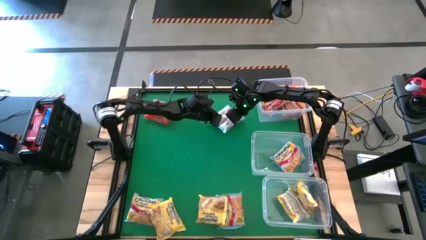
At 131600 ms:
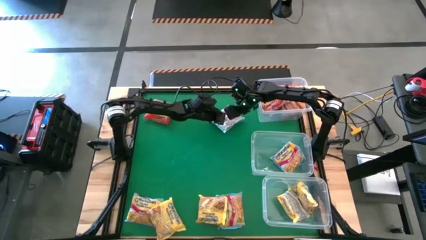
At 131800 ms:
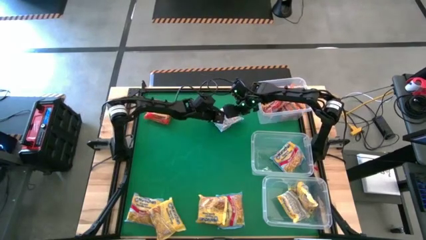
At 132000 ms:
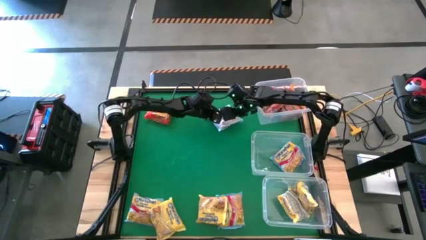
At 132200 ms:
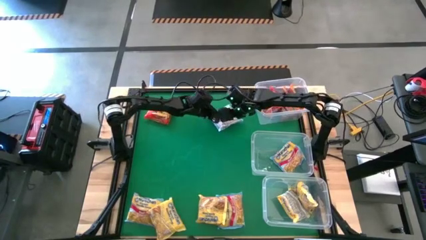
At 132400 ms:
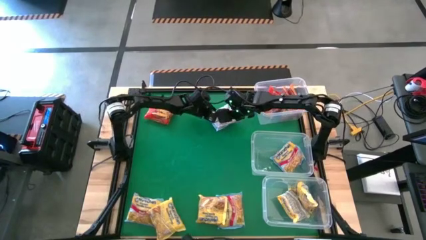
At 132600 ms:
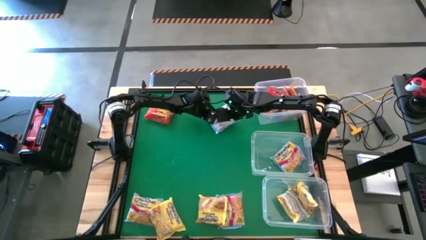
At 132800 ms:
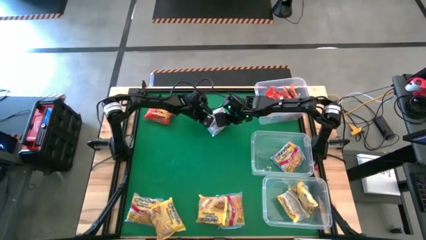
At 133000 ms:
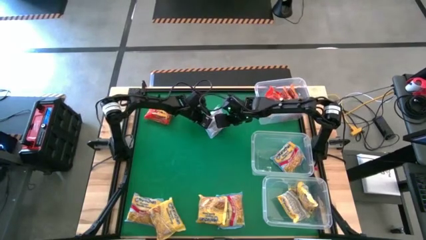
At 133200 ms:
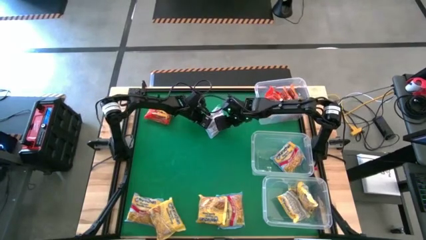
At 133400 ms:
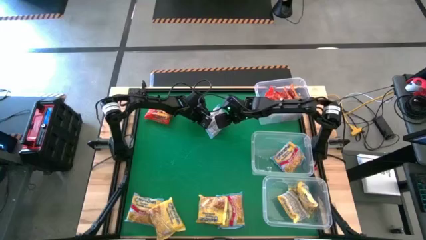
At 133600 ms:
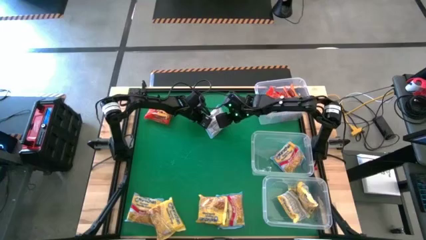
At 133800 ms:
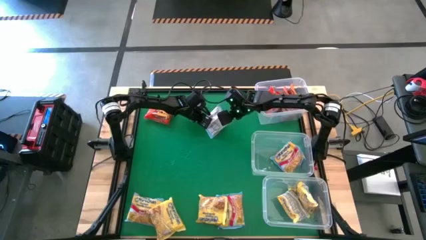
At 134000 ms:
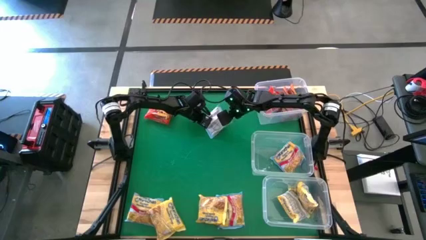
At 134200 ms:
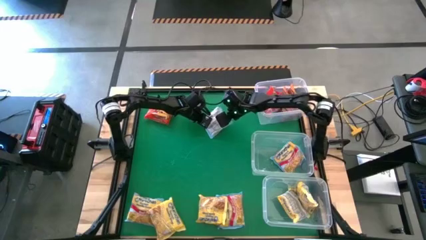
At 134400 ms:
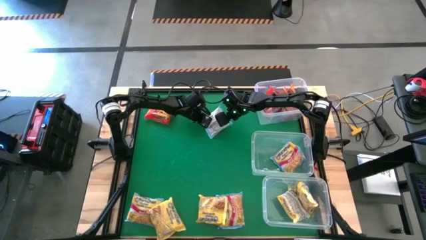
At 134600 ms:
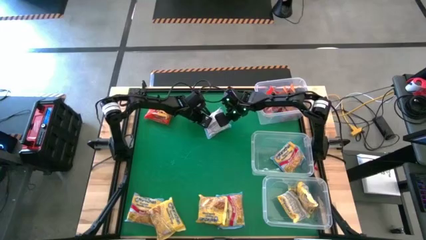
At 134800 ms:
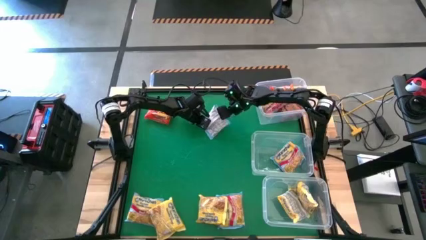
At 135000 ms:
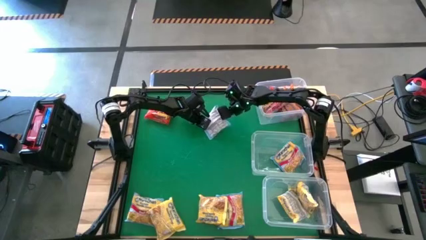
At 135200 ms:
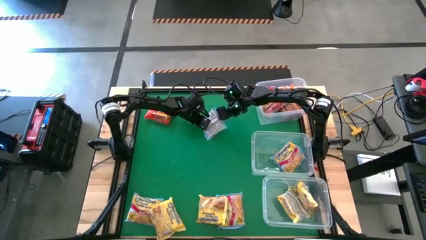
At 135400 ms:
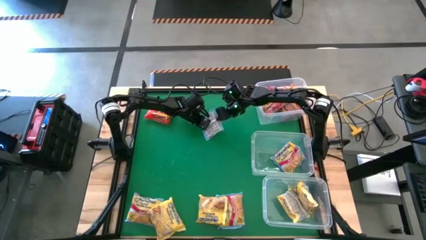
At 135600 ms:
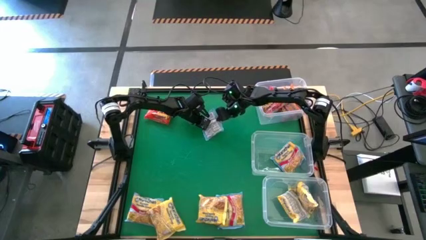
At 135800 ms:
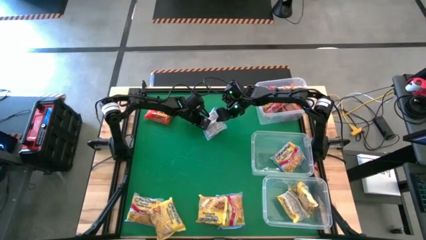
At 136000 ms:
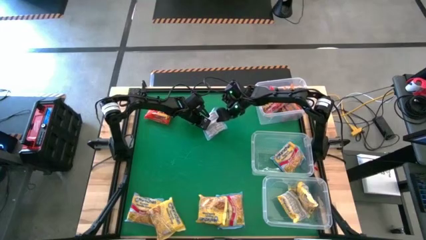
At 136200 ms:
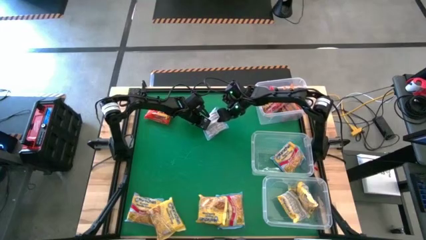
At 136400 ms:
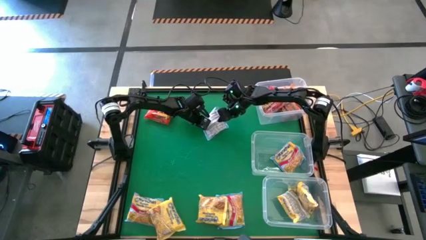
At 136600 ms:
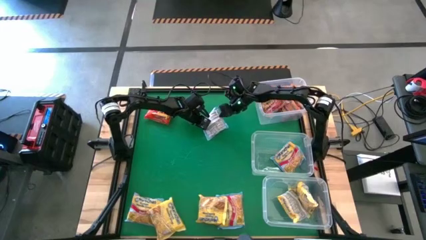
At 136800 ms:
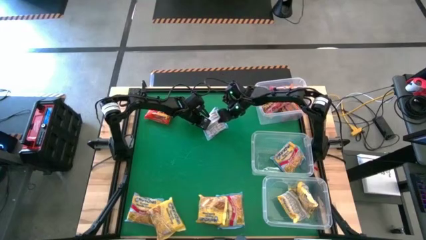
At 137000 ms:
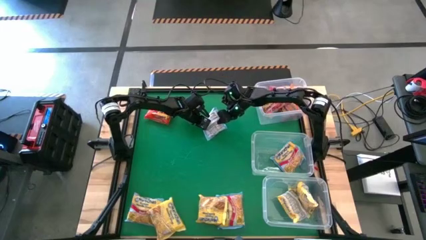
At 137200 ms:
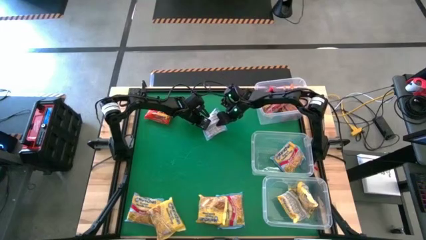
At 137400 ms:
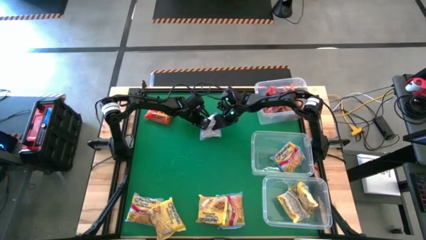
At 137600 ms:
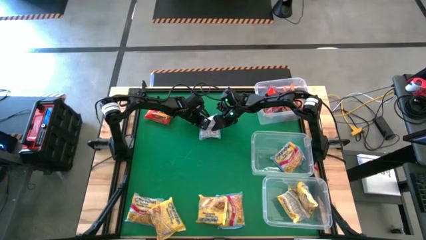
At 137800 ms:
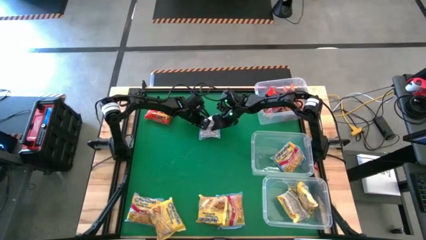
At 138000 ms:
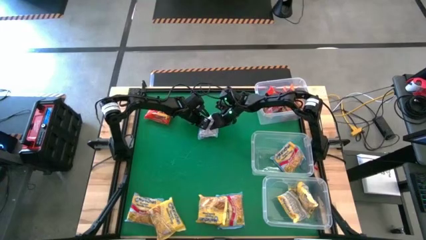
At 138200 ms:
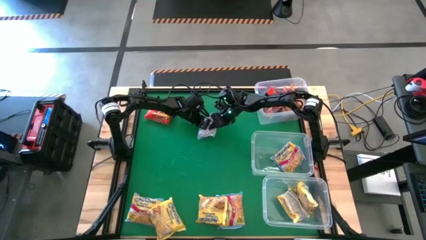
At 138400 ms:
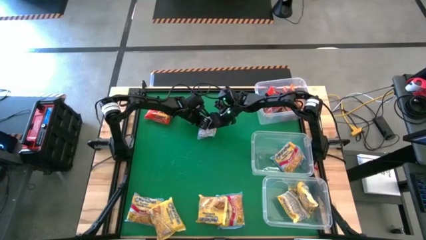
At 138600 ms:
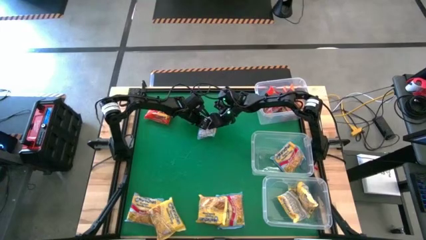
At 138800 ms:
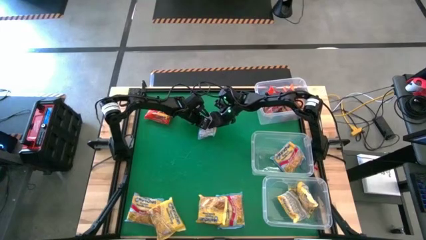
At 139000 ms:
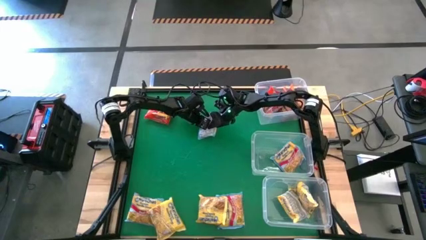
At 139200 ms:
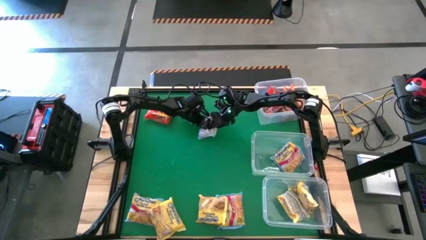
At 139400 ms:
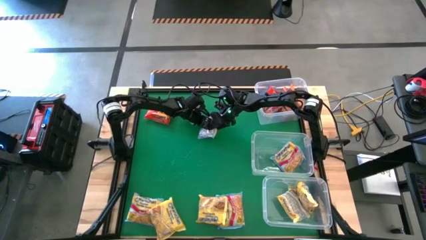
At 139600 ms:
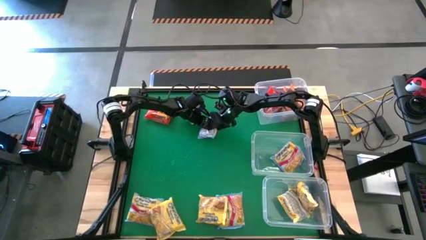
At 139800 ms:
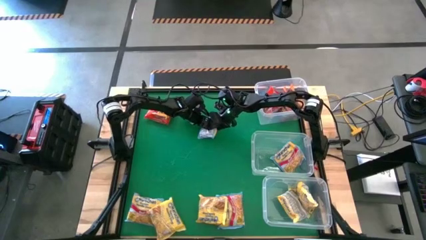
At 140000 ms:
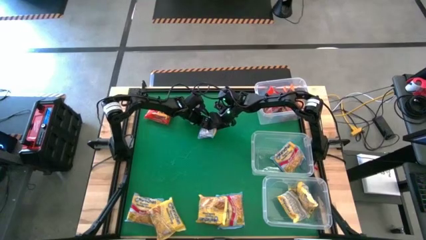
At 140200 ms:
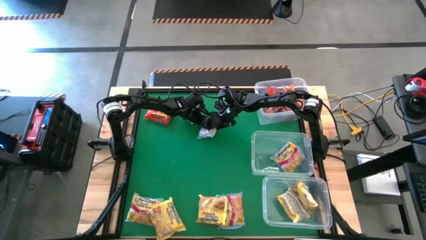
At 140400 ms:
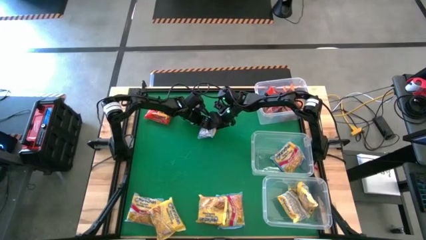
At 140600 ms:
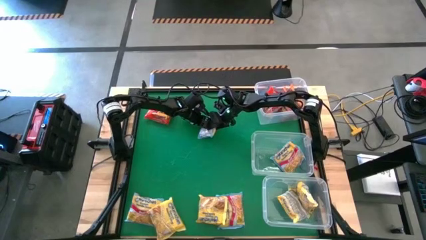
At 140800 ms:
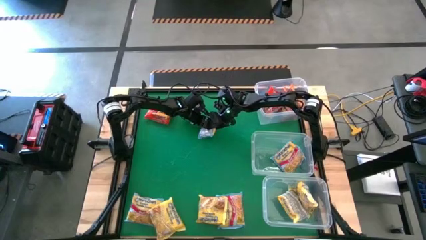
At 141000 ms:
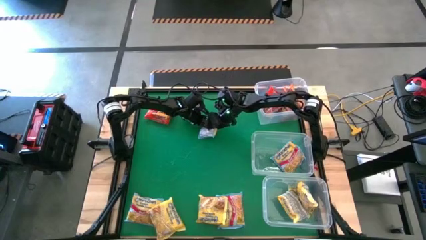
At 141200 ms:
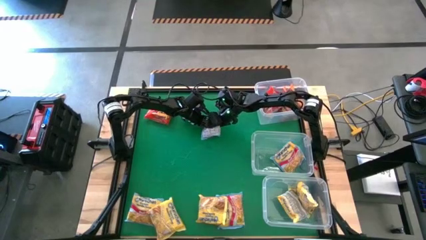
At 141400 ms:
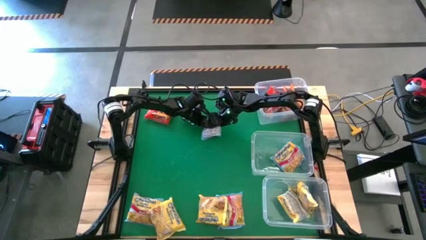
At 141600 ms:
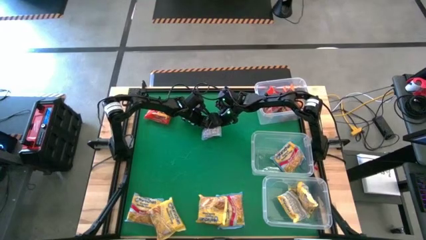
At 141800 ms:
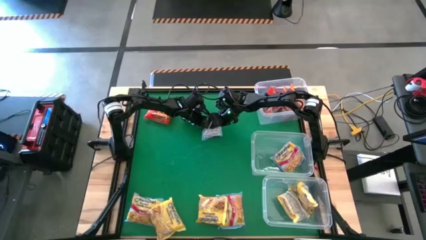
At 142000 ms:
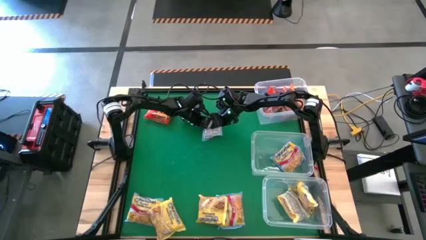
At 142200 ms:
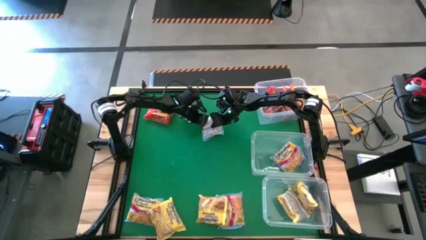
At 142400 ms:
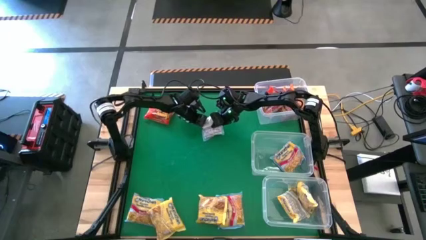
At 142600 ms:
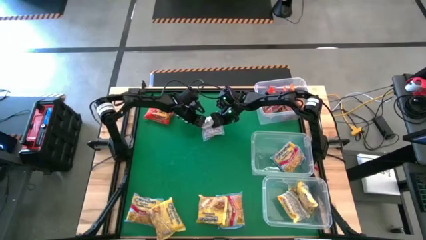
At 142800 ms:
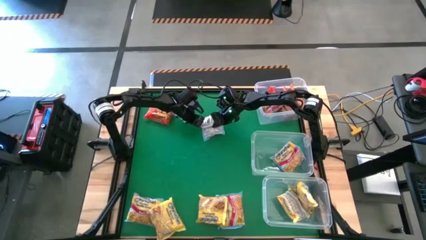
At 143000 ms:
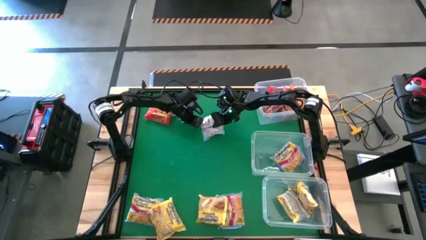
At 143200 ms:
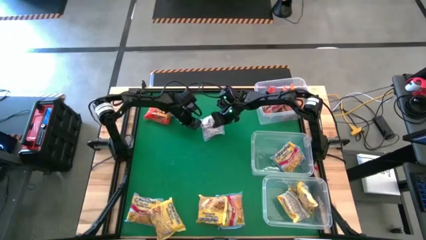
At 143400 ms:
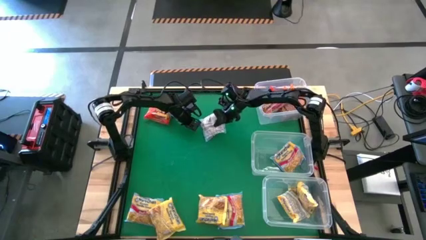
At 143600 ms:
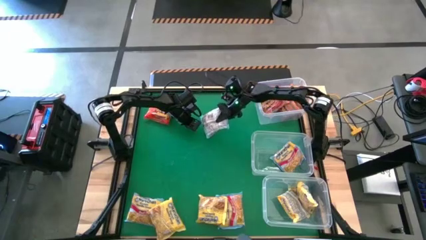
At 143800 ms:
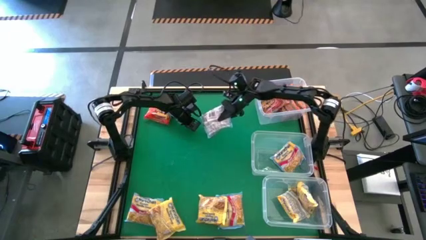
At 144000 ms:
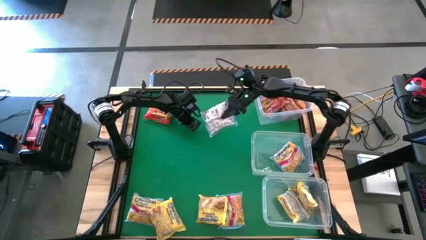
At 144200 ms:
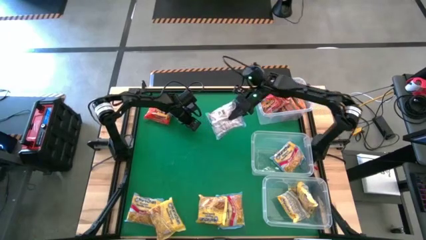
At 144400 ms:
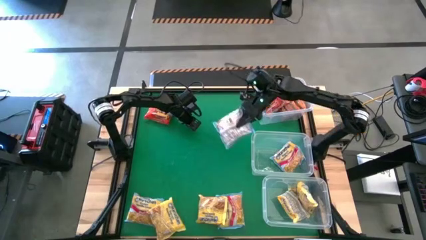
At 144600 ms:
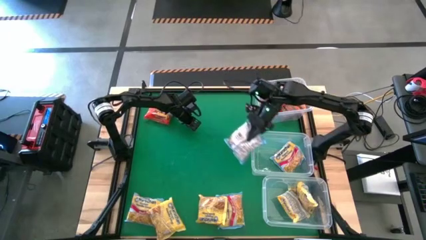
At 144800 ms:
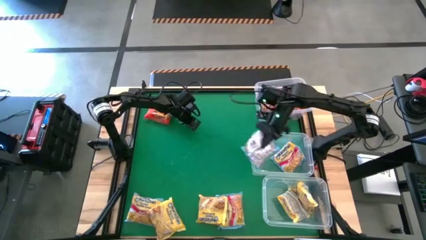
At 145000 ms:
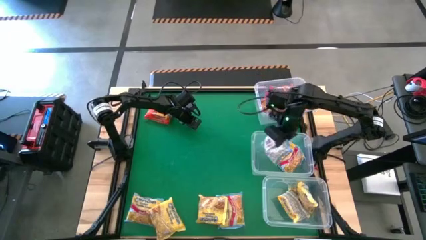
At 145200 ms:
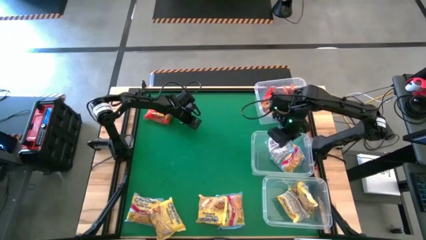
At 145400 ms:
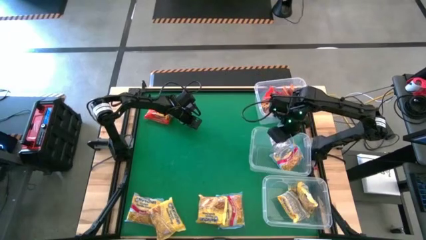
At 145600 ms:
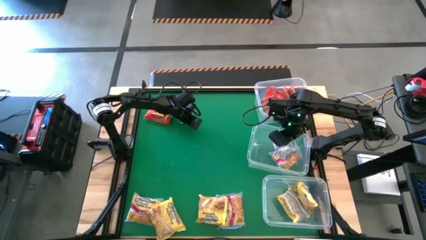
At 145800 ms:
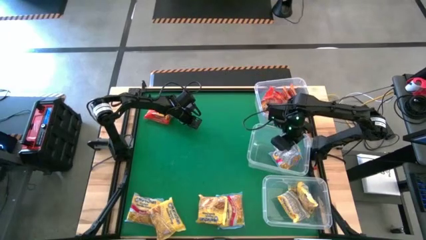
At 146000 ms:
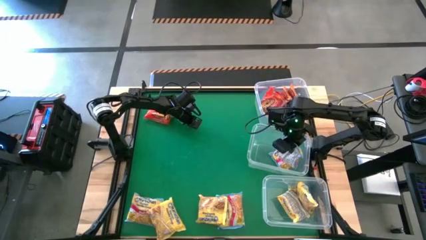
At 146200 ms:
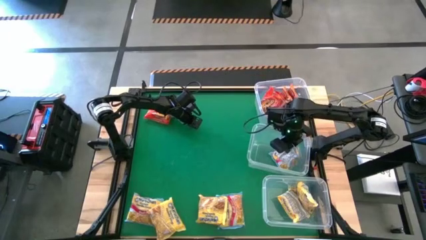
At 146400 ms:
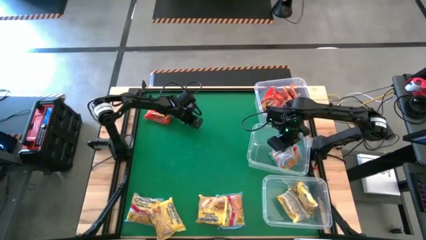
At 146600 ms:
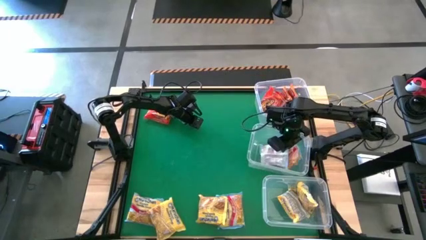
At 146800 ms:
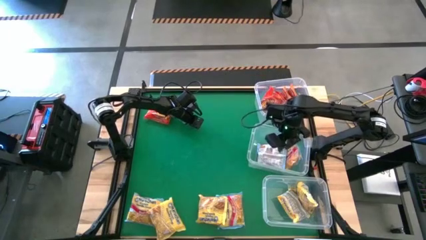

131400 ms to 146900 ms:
Task: Sort Maruchan noodles
Put the top middle blue noodle pack into the middle transparent bin
